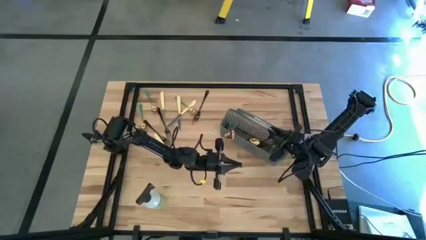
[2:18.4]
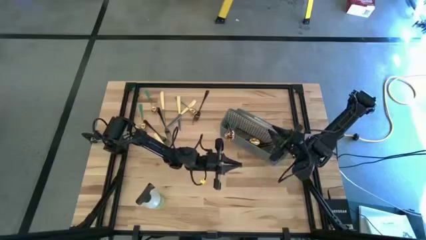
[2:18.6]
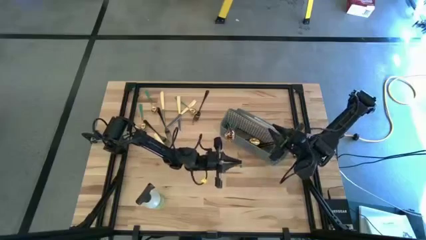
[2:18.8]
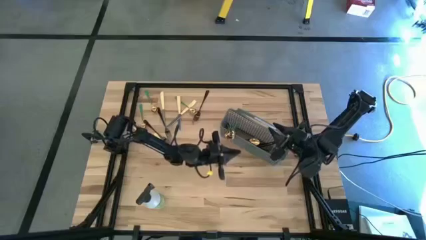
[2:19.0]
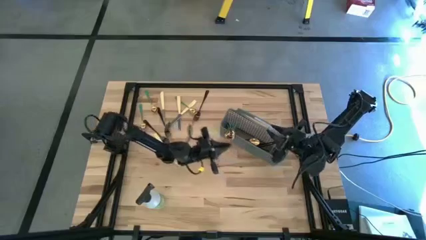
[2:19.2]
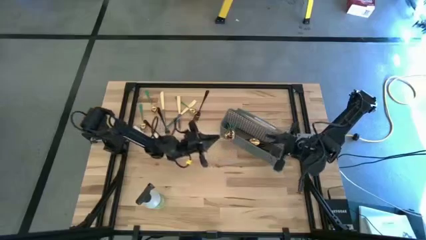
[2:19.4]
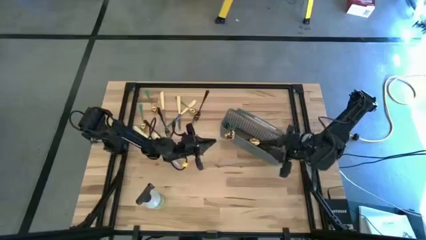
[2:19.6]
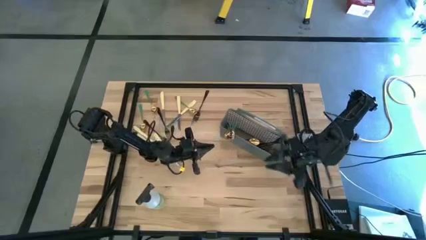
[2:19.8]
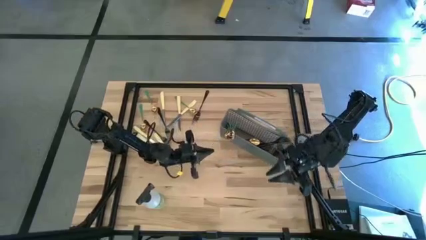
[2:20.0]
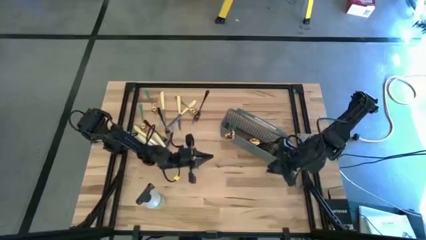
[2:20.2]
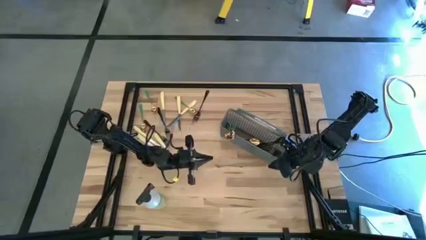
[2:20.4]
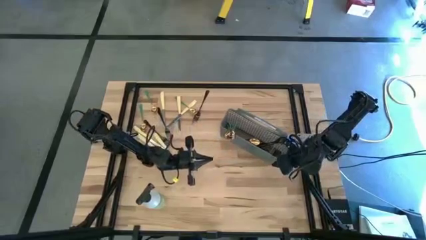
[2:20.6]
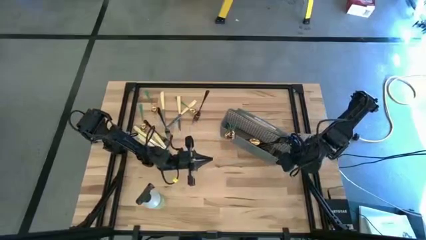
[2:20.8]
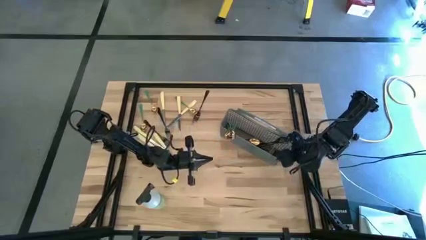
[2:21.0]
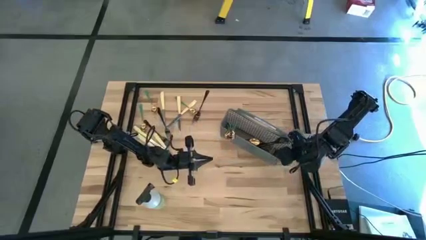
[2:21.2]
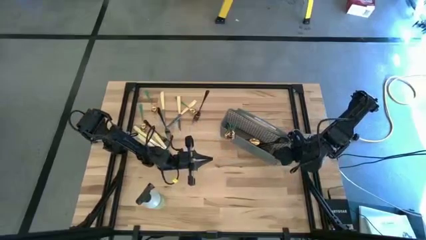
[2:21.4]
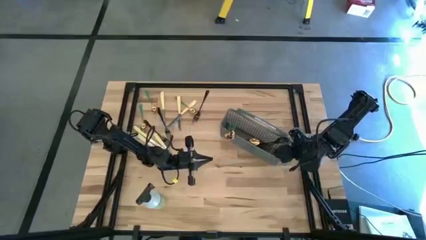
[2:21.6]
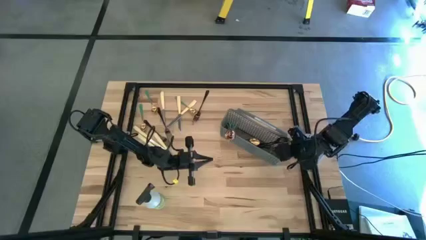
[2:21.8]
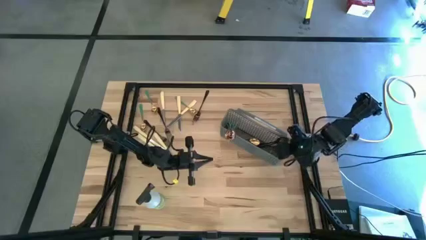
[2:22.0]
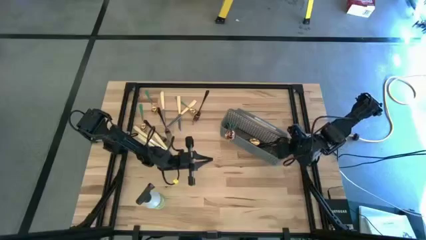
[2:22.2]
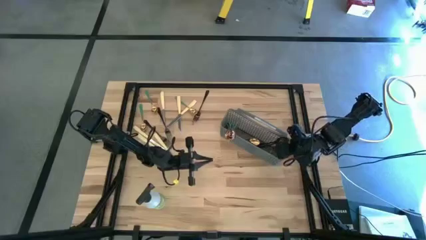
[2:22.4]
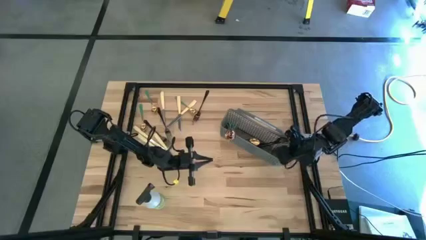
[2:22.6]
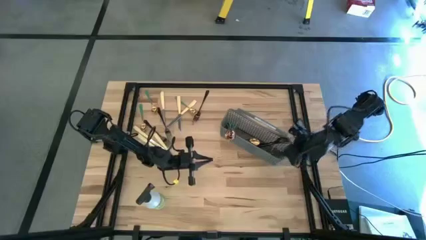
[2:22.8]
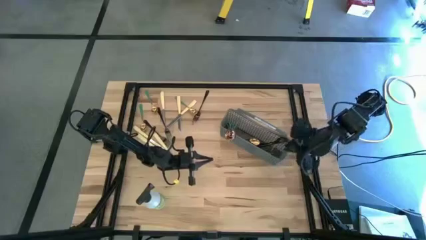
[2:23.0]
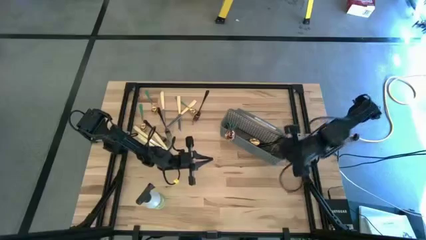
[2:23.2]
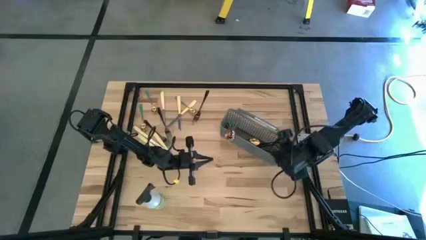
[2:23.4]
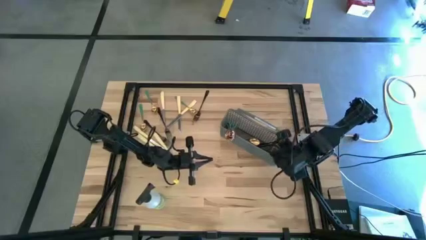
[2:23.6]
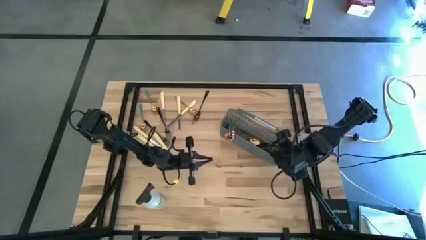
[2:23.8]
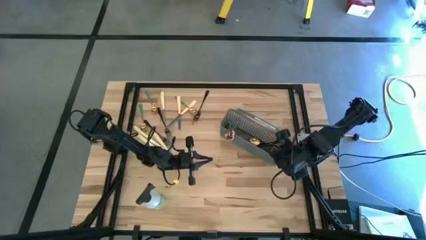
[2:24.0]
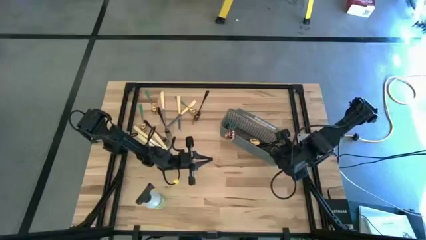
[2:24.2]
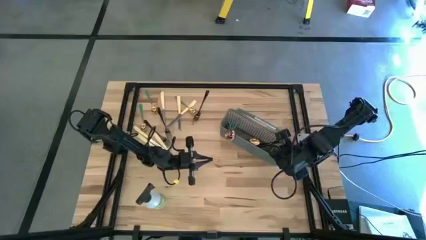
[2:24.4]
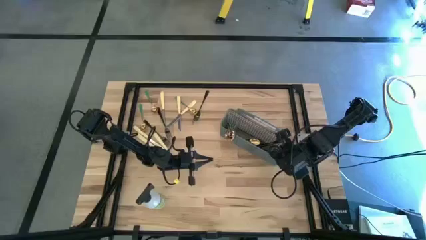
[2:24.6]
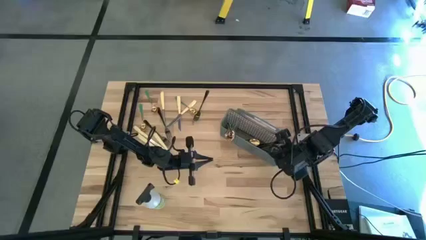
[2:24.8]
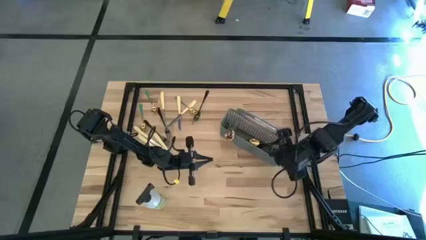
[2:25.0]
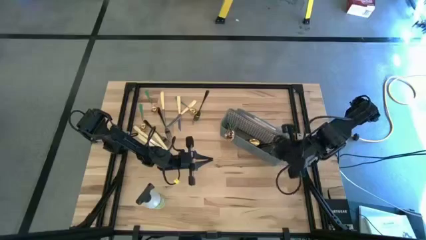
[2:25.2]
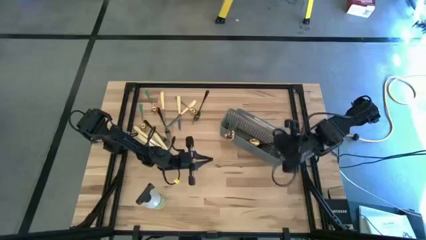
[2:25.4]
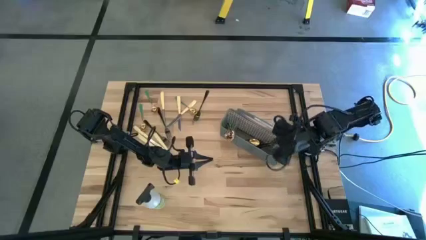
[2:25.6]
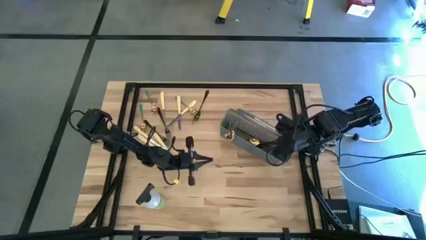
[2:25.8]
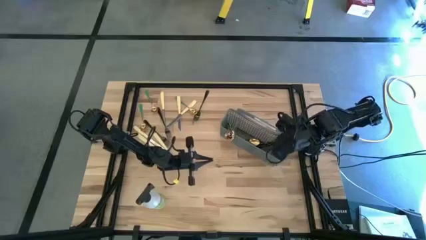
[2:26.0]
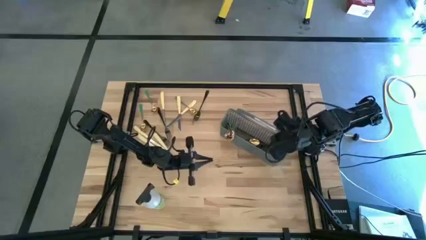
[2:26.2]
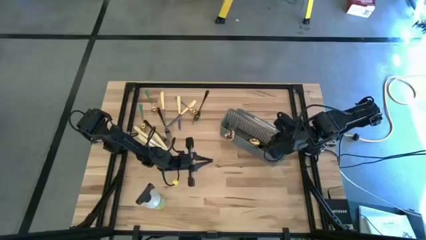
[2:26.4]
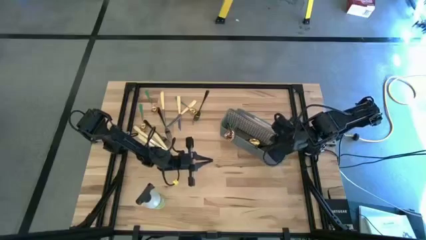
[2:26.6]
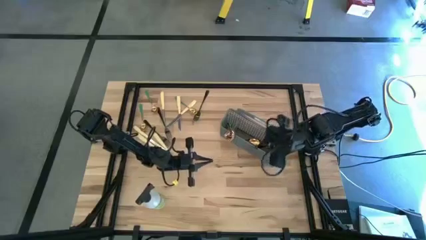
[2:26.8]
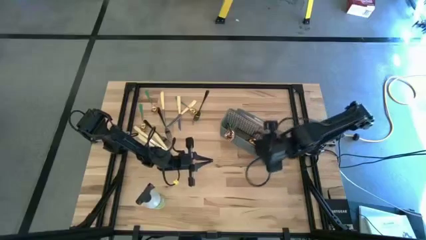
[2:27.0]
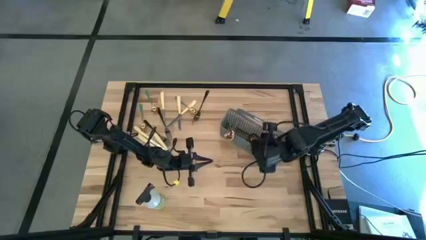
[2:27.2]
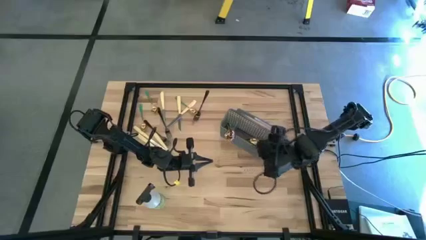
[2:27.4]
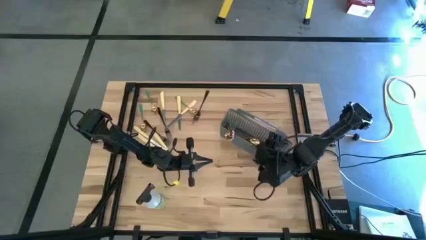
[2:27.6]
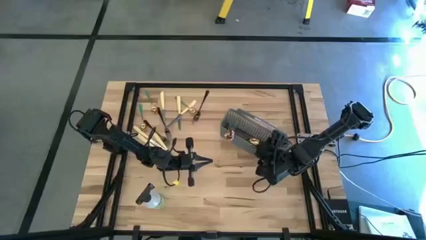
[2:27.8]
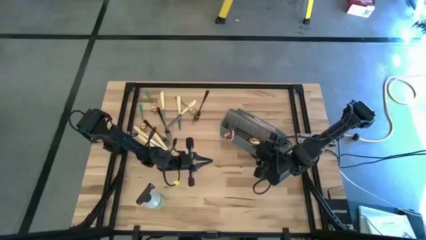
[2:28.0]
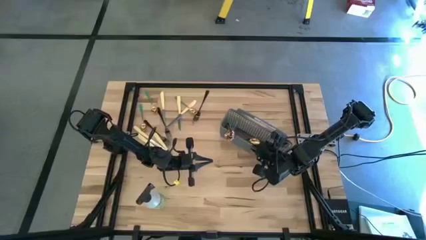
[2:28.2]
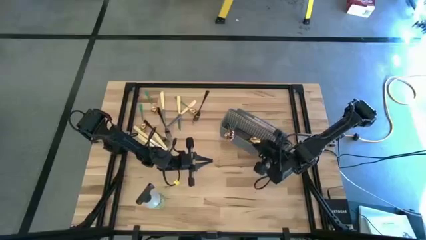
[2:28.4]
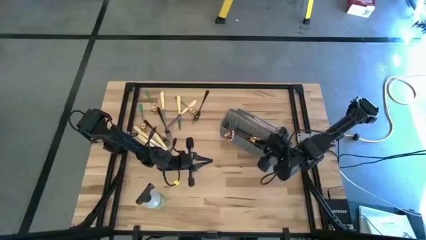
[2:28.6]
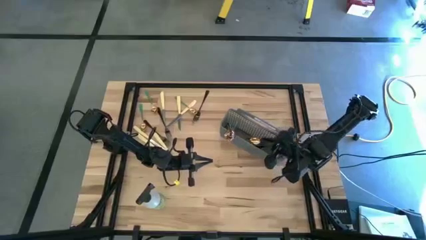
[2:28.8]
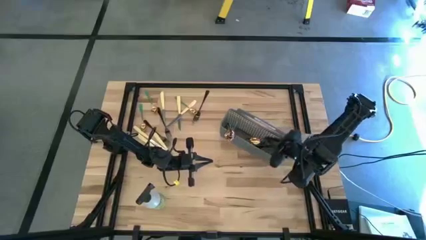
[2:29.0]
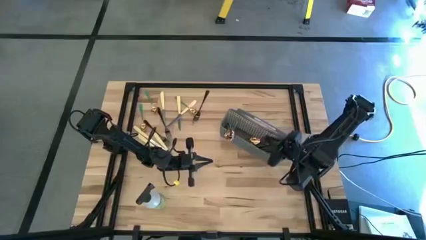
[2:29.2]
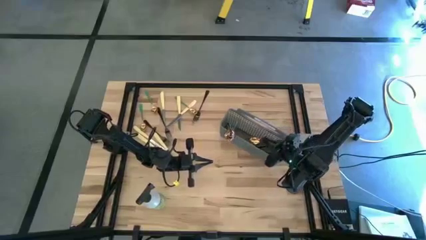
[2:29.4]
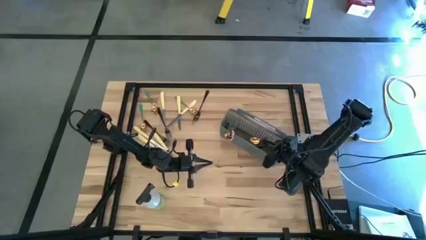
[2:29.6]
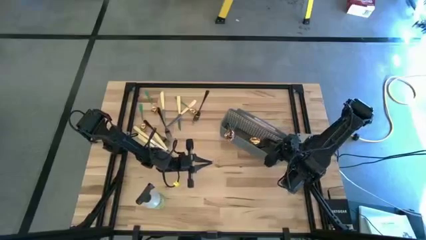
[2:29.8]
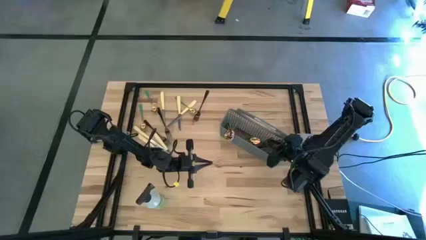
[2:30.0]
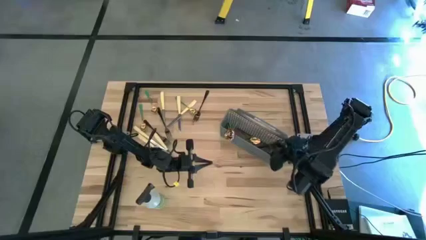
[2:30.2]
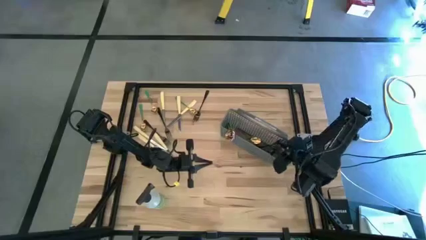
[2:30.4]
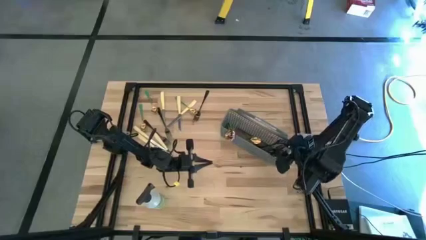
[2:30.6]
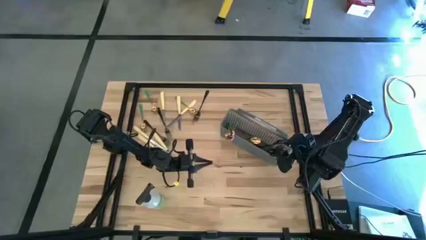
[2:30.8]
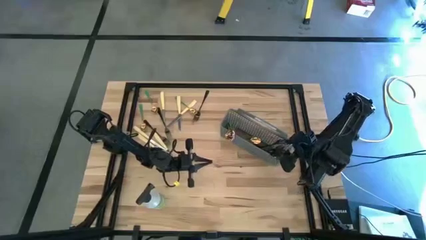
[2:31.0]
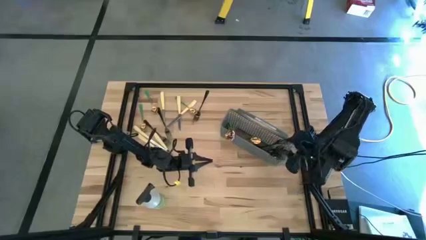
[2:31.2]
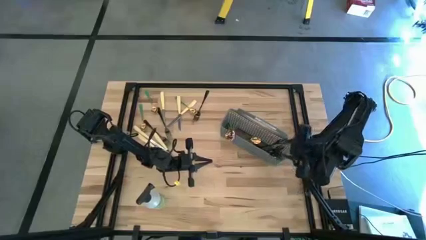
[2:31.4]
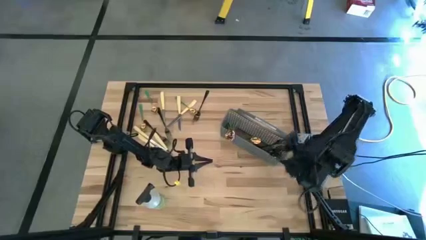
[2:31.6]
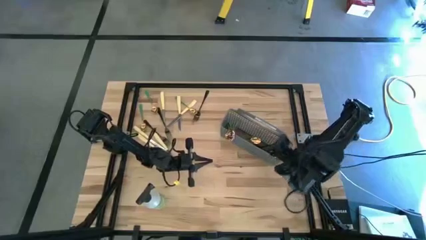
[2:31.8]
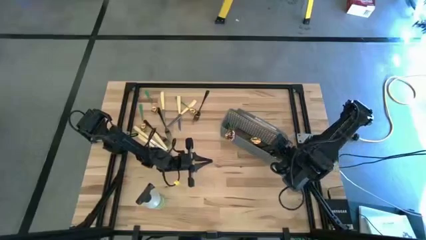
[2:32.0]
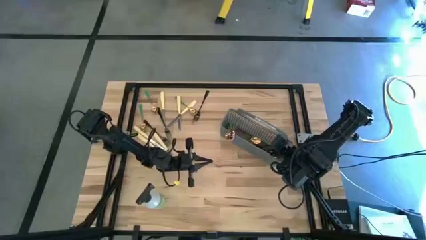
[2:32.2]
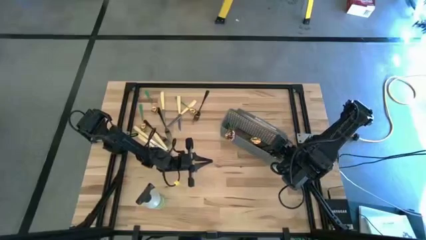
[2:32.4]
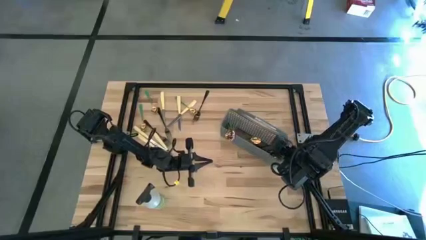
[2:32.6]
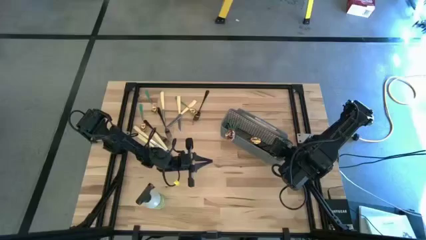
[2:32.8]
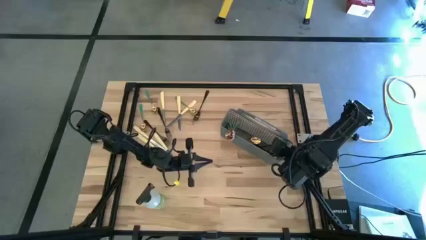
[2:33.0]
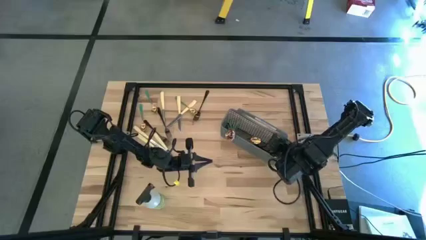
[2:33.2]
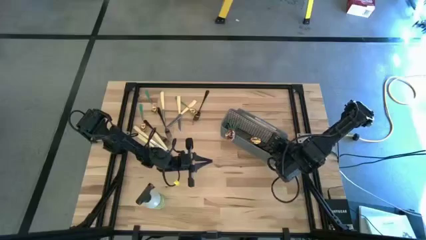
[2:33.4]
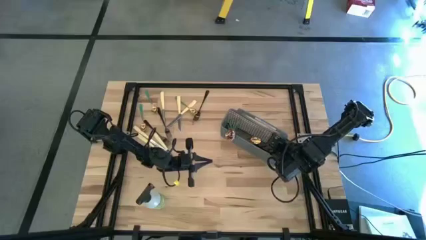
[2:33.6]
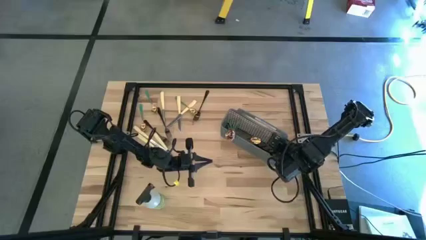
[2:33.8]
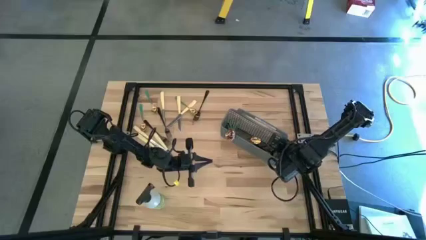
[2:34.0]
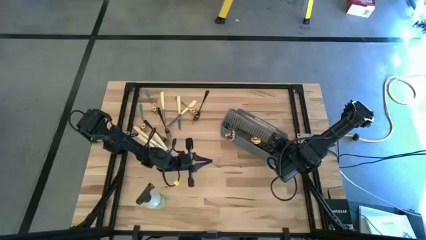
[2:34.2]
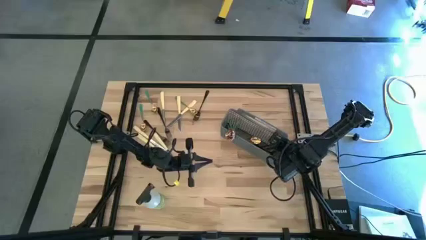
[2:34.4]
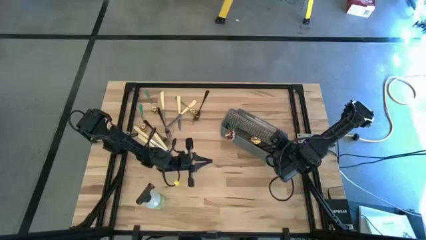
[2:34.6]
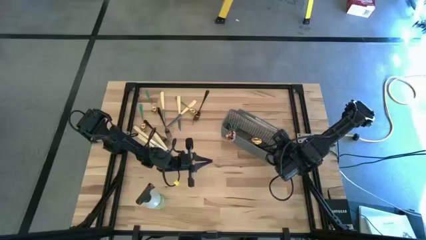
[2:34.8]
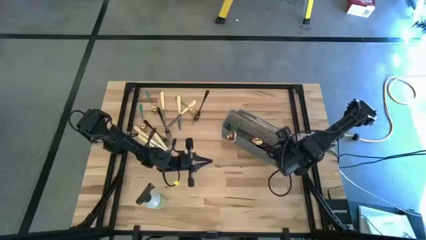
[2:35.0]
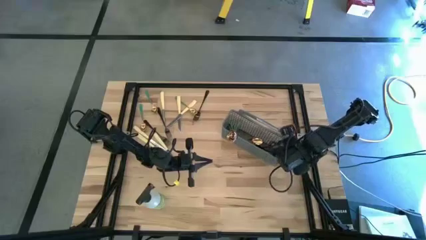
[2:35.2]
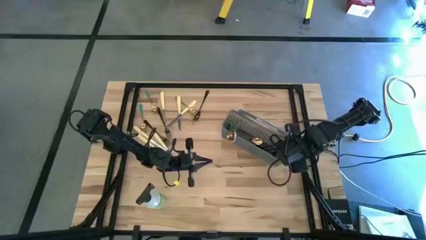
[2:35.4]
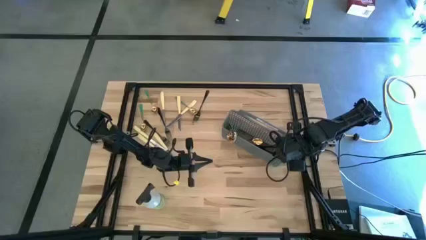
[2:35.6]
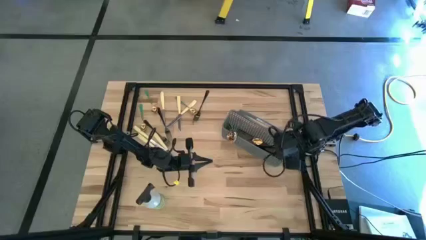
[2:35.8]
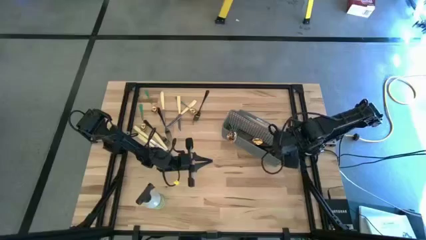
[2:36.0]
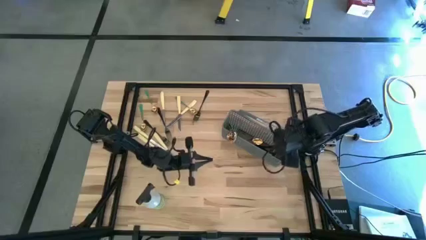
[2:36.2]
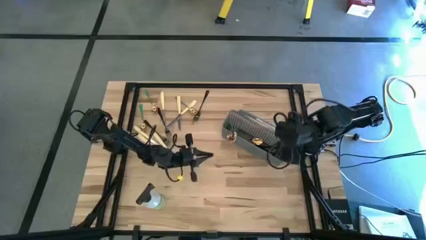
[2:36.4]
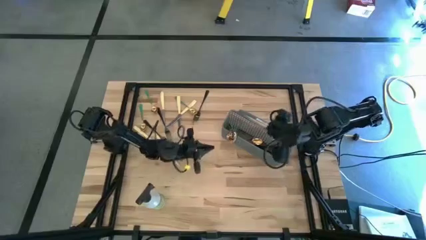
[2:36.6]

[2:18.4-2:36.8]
Task: Sort silverware
Adjust the black forks
